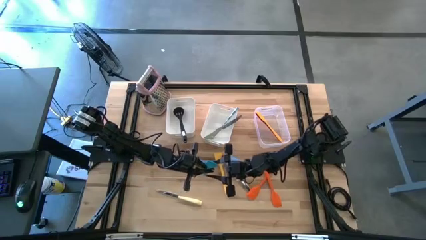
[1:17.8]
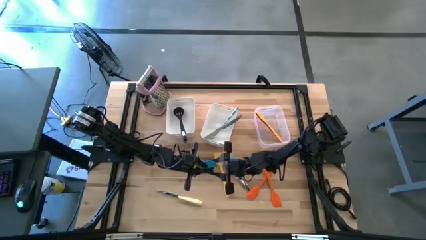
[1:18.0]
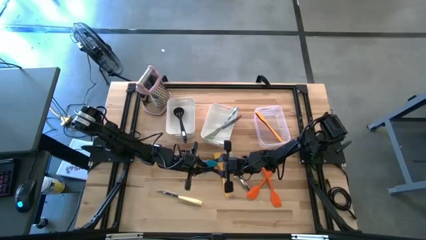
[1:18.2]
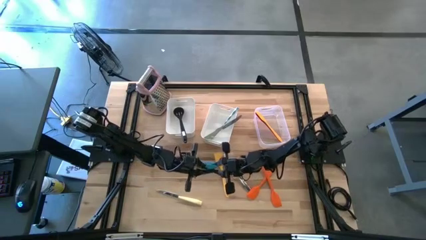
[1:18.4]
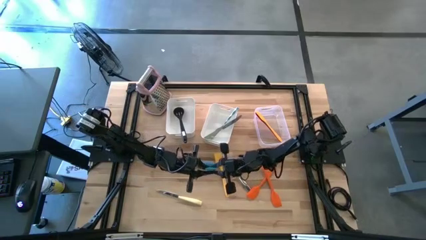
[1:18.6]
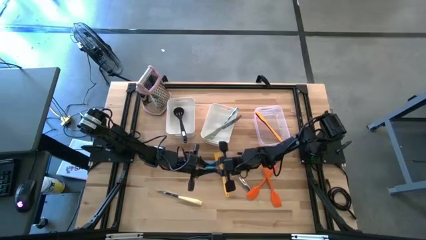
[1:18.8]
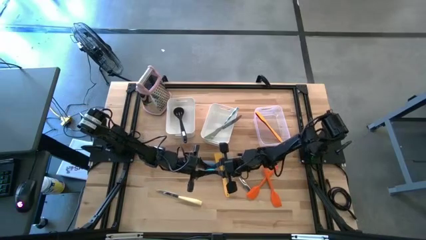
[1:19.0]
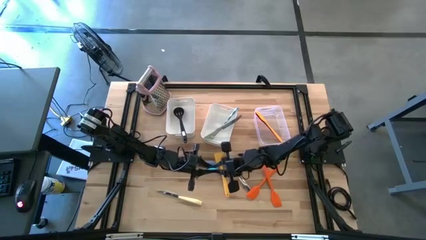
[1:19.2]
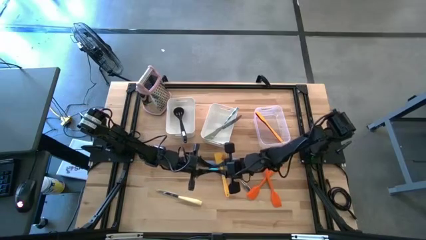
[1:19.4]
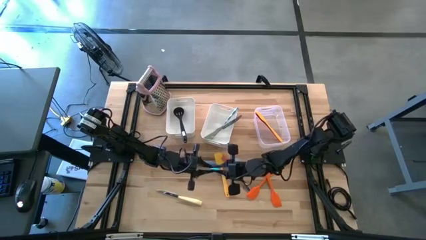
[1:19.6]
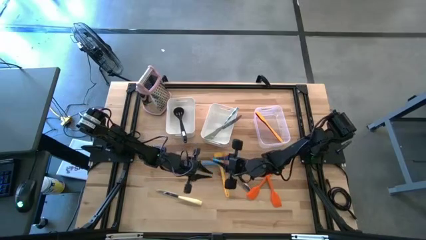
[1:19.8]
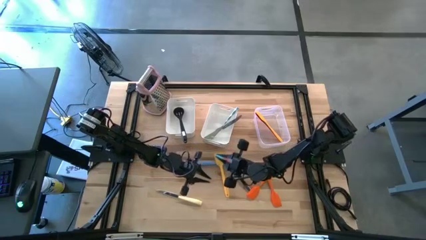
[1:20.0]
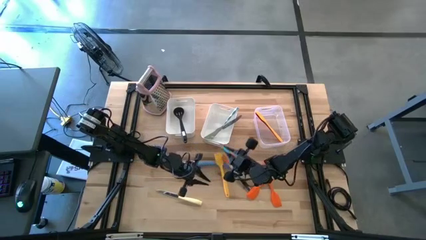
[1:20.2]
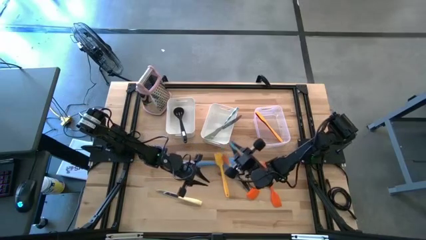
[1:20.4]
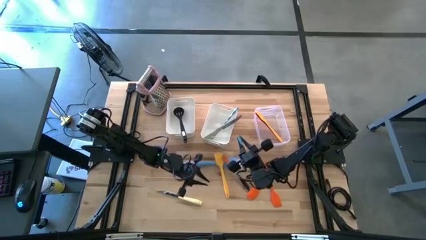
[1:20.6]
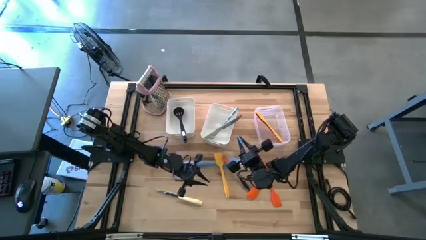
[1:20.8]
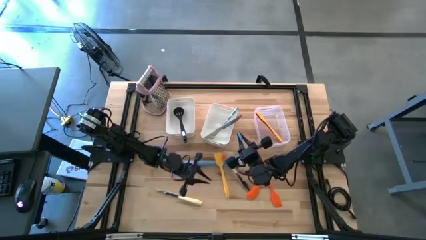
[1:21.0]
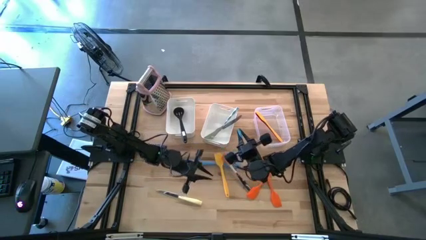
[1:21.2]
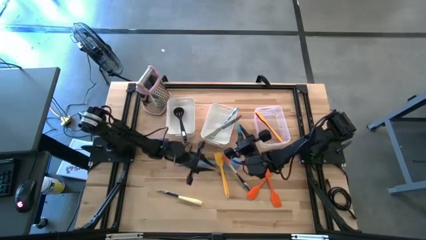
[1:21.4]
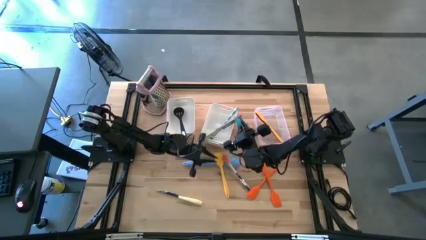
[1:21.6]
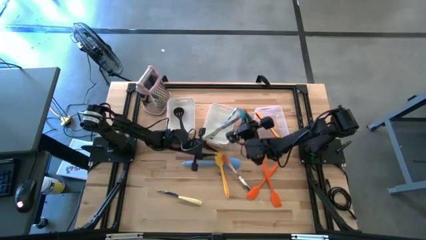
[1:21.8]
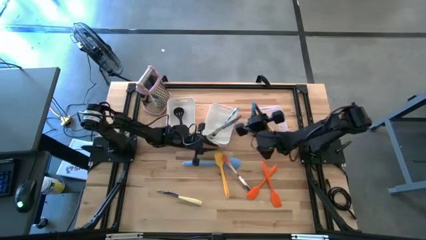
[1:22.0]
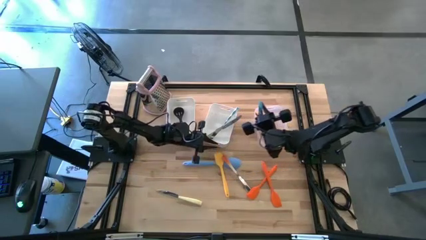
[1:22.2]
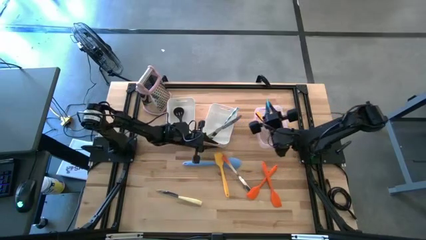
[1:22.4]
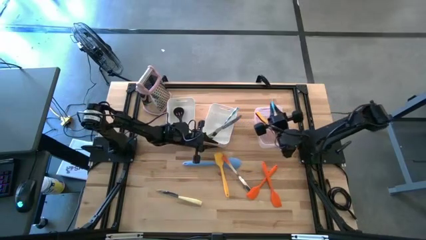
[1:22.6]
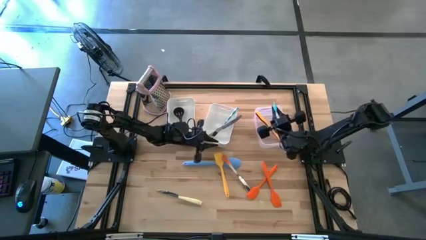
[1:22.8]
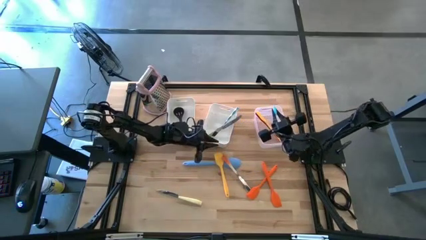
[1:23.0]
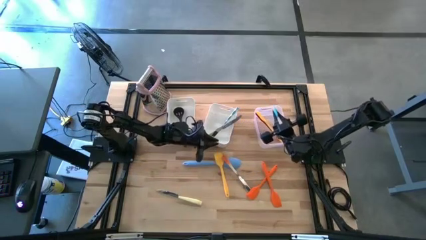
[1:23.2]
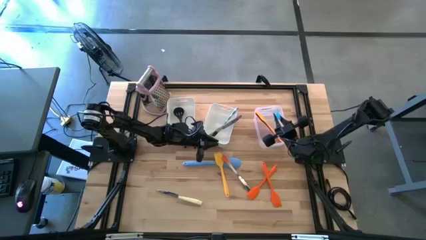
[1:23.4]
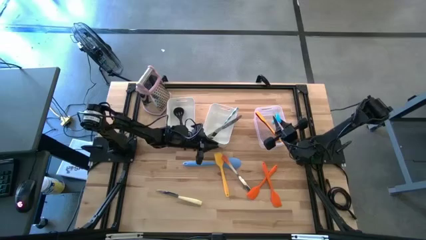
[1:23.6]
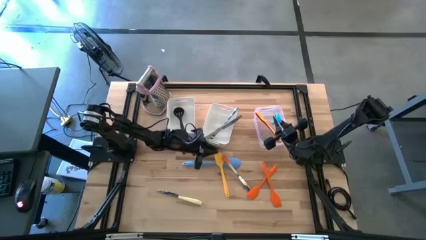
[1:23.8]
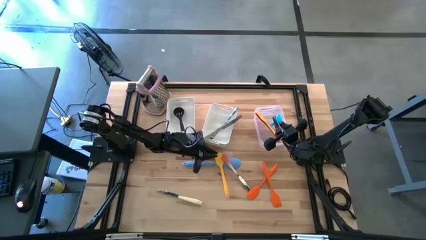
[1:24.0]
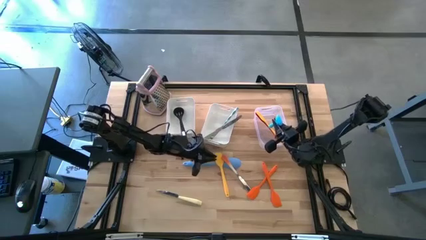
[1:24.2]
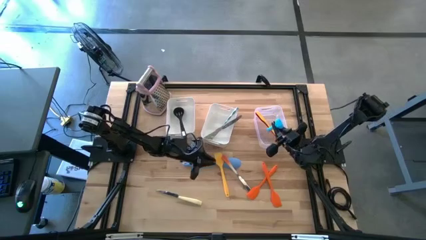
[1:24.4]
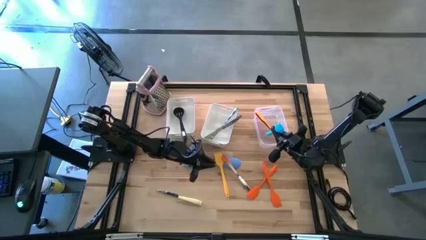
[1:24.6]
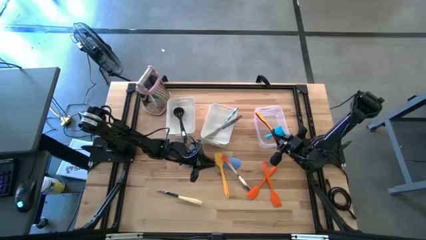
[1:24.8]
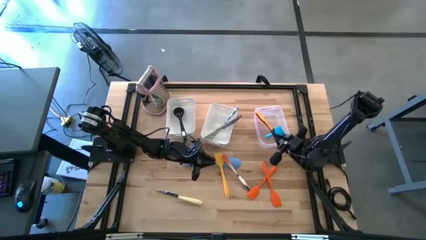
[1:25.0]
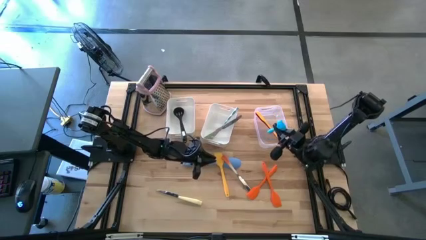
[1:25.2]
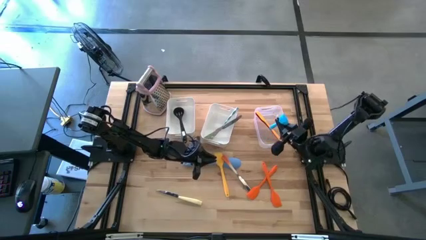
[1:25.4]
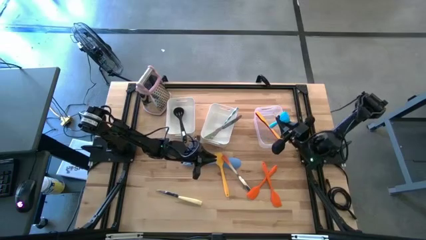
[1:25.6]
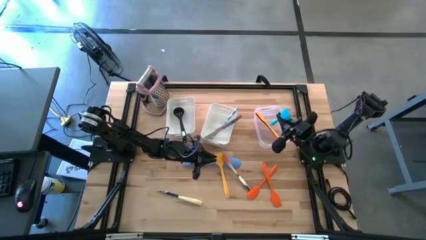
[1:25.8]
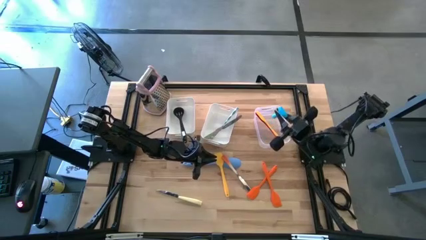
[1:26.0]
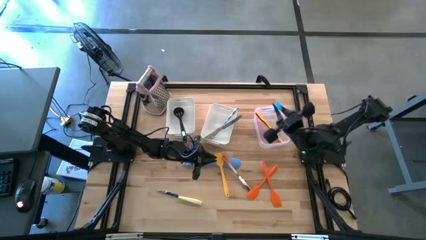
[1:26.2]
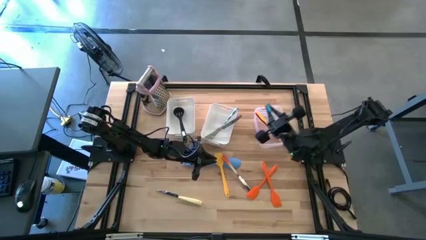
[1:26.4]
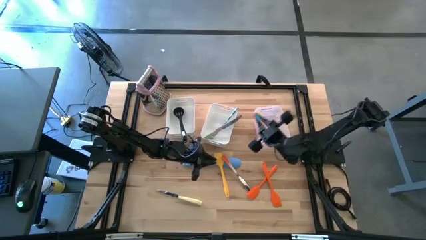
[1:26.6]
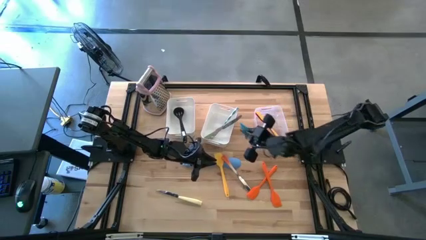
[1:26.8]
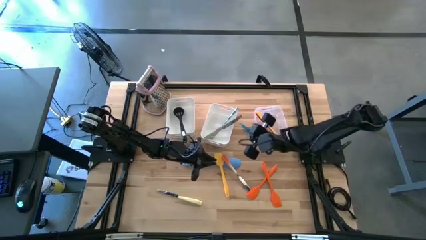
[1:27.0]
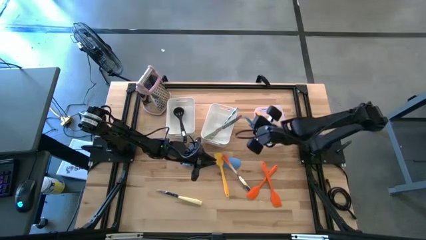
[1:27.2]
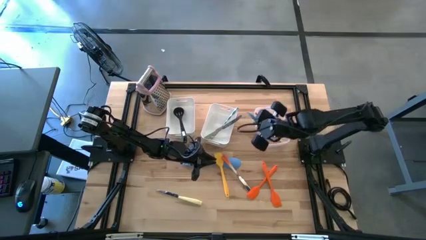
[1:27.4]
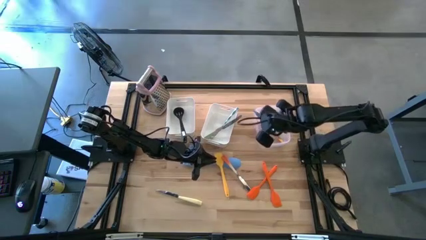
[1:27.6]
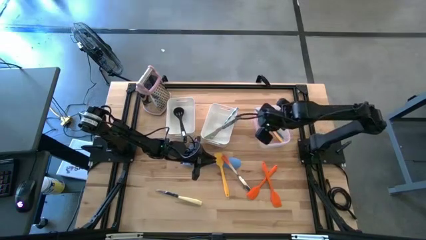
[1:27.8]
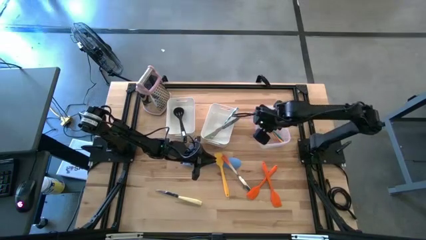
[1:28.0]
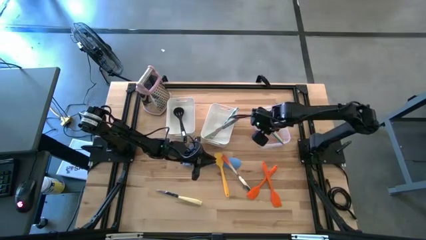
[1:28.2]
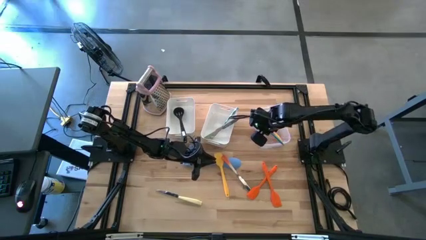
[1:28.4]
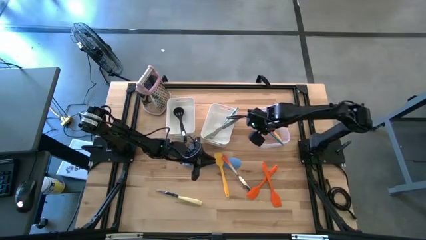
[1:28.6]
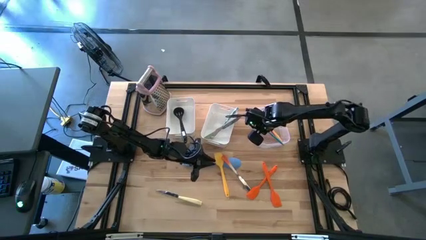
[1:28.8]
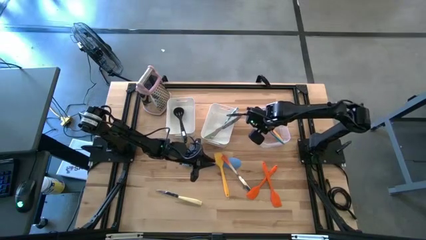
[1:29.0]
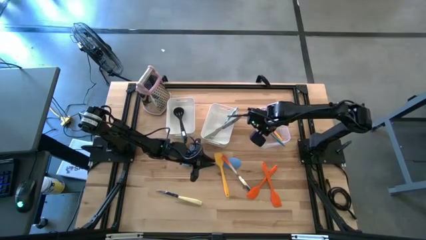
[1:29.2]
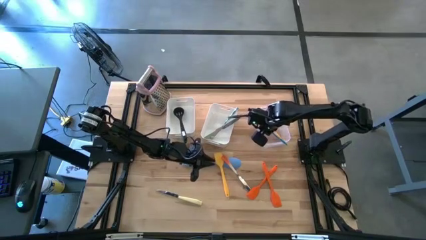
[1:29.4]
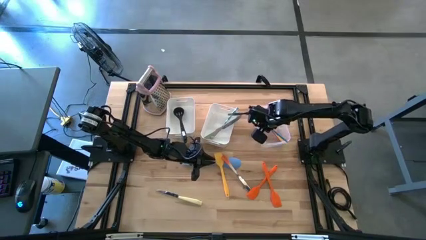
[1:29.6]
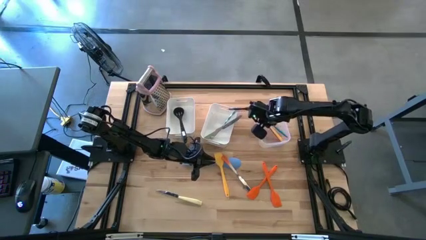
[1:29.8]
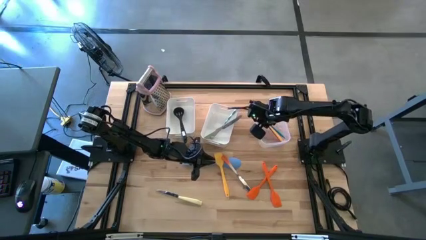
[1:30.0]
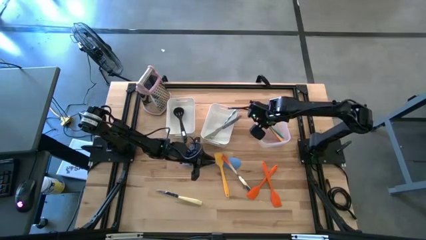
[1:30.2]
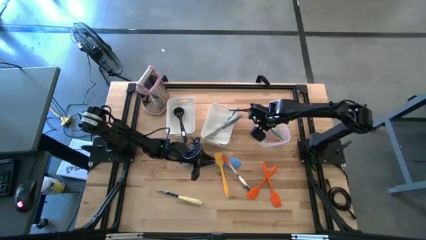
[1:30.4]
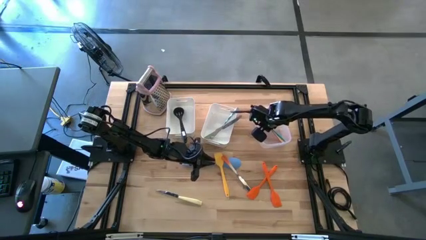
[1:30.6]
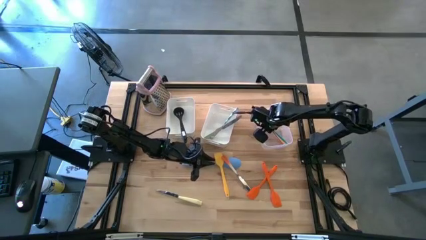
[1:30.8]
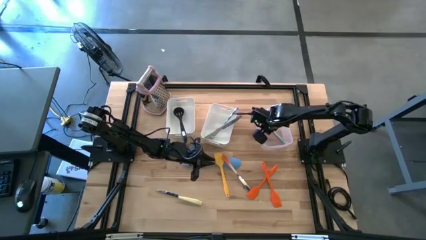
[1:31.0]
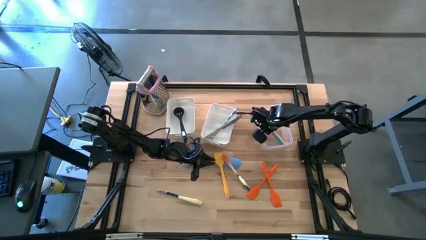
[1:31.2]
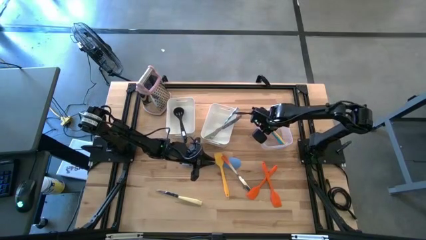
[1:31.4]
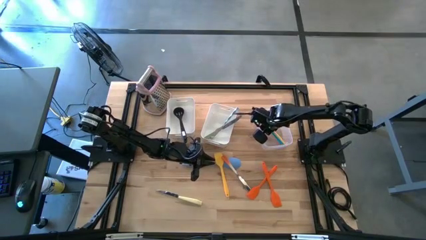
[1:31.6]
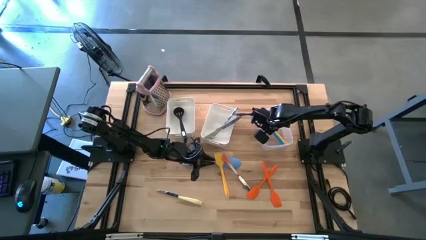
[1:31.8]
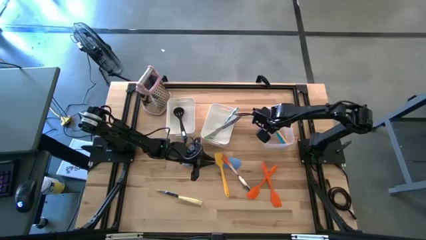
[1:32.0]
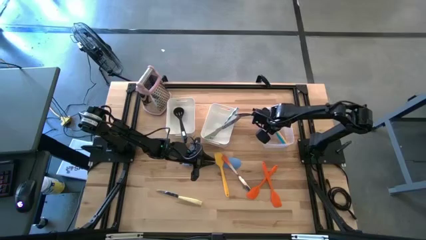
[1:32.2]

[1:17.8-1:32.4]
Task: Pick & Place Kitchen Items
Put the blue spatula into the transparent bin
